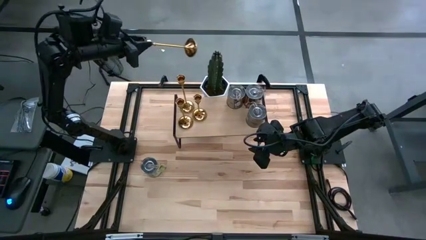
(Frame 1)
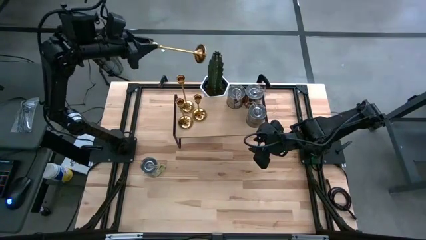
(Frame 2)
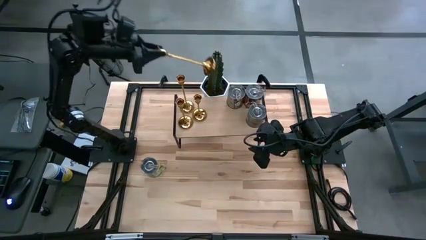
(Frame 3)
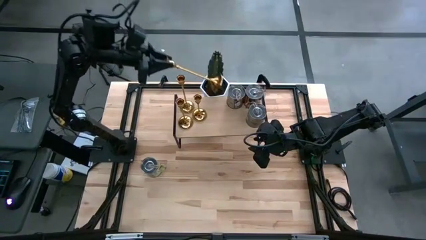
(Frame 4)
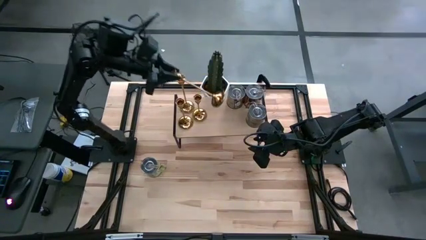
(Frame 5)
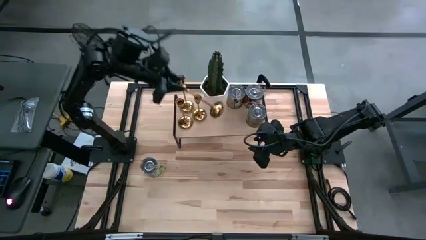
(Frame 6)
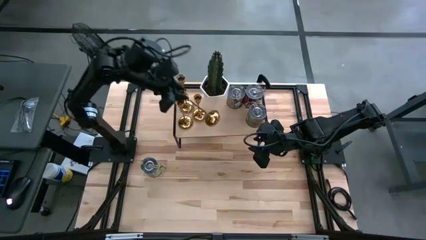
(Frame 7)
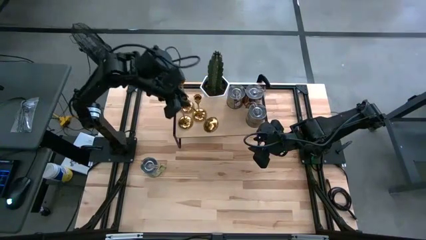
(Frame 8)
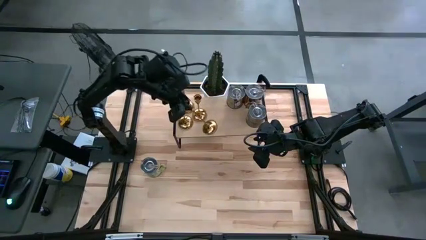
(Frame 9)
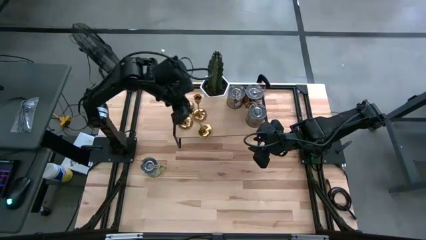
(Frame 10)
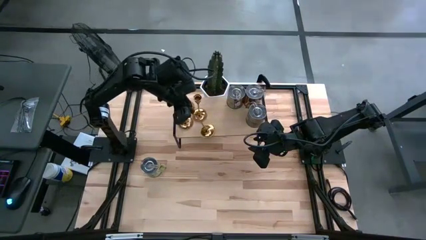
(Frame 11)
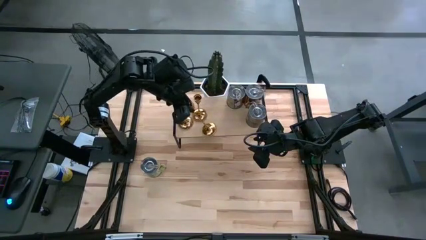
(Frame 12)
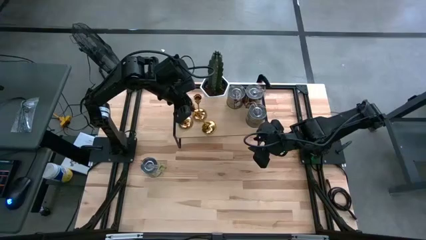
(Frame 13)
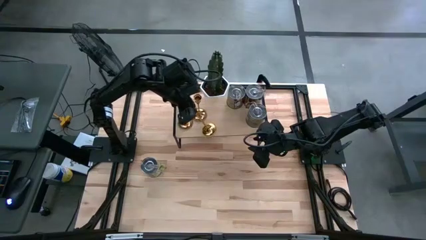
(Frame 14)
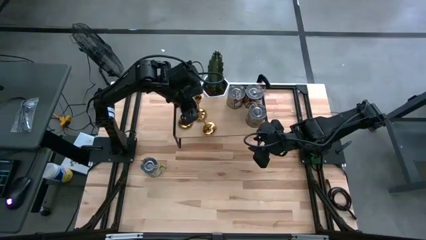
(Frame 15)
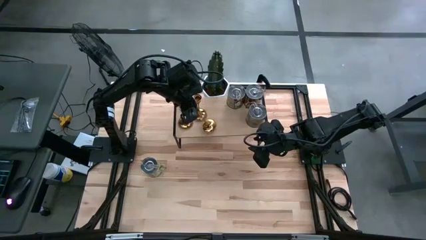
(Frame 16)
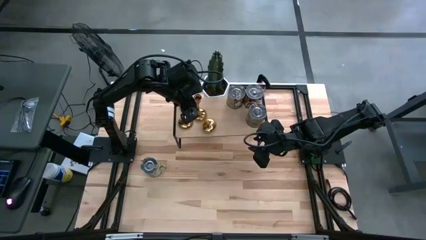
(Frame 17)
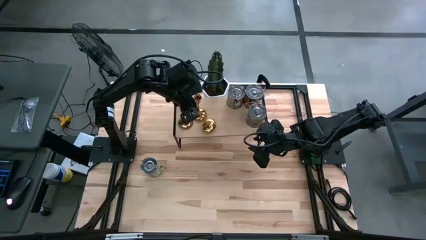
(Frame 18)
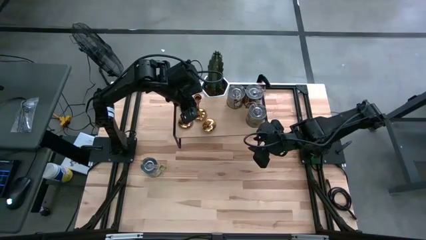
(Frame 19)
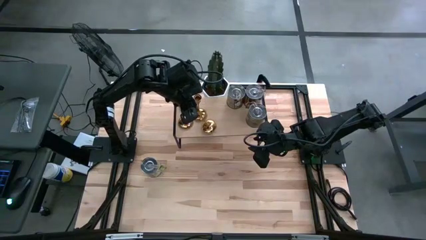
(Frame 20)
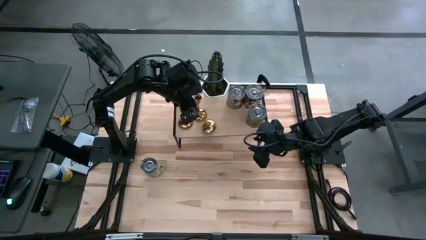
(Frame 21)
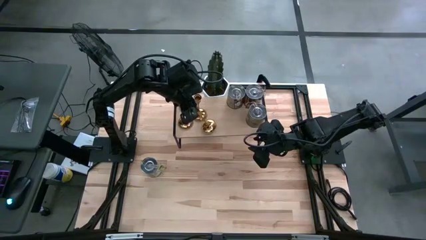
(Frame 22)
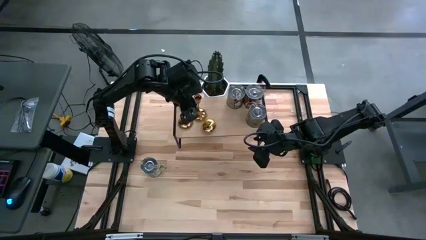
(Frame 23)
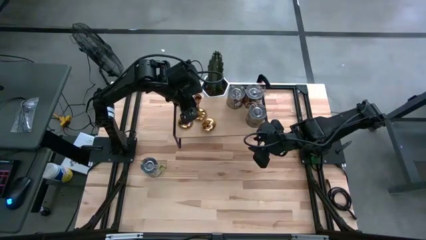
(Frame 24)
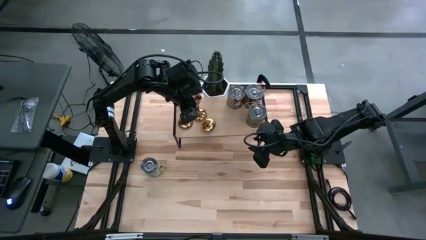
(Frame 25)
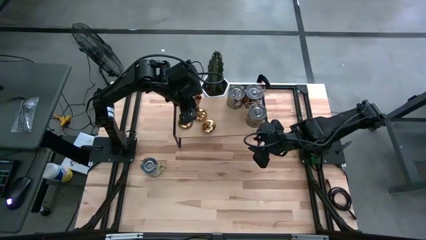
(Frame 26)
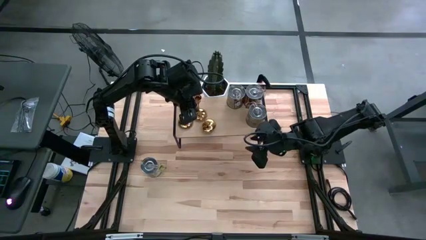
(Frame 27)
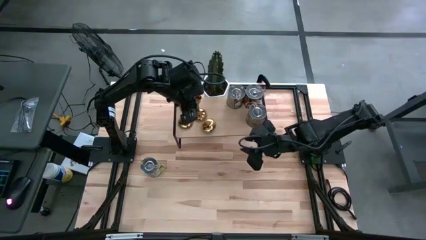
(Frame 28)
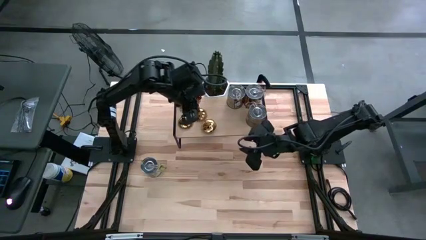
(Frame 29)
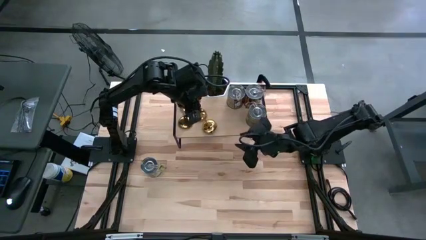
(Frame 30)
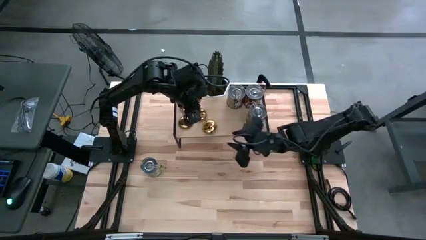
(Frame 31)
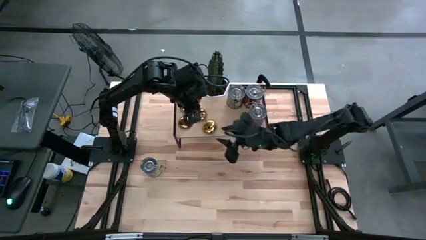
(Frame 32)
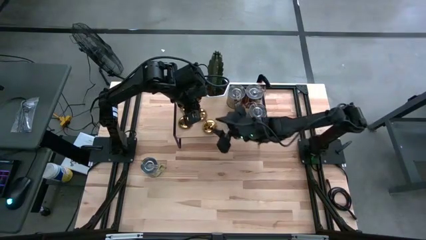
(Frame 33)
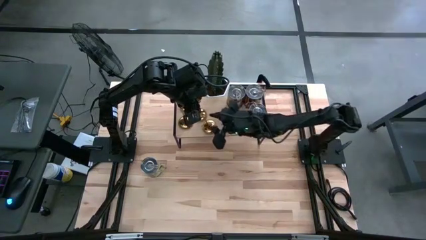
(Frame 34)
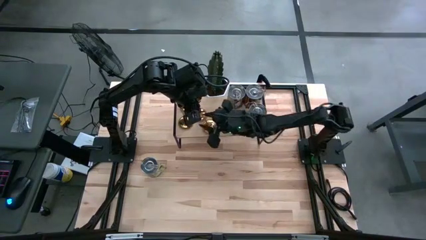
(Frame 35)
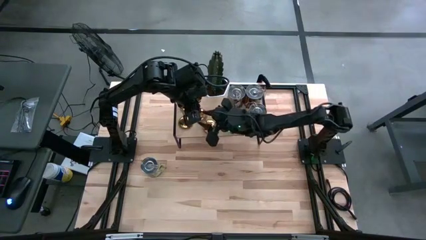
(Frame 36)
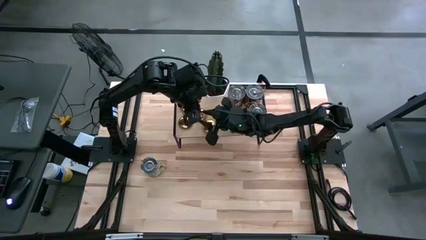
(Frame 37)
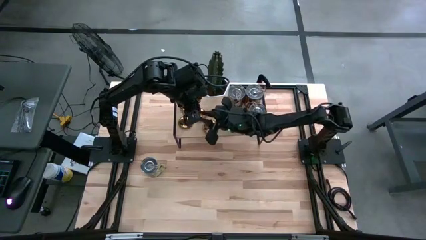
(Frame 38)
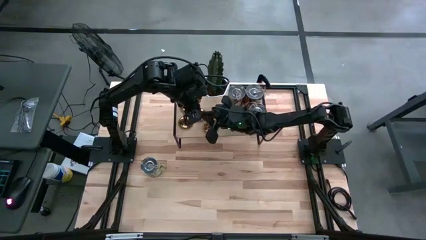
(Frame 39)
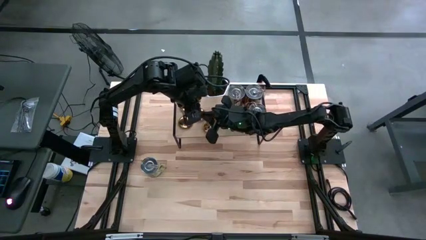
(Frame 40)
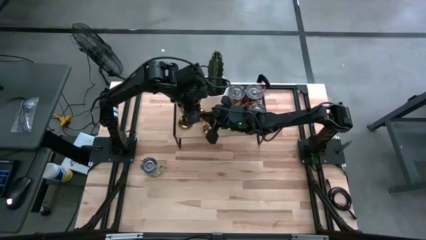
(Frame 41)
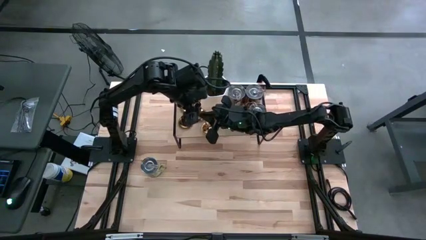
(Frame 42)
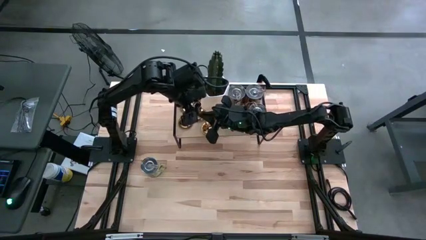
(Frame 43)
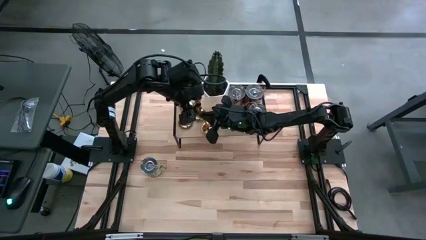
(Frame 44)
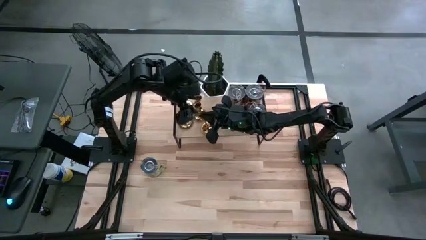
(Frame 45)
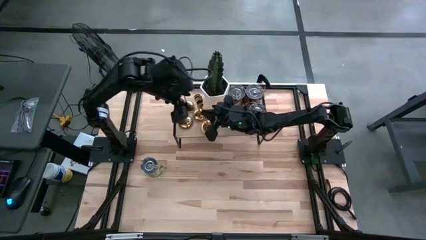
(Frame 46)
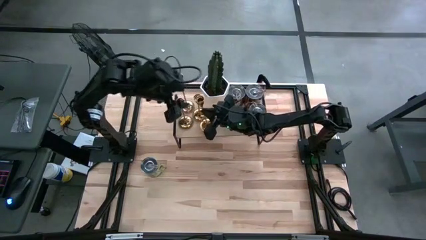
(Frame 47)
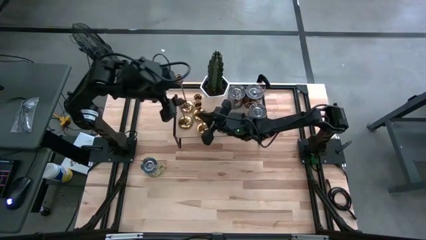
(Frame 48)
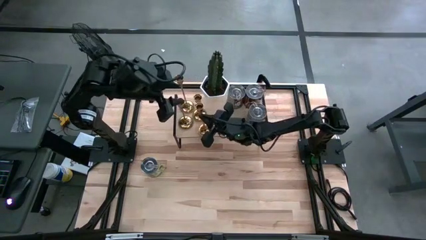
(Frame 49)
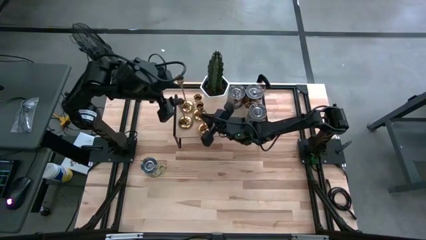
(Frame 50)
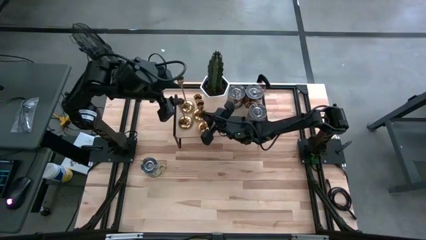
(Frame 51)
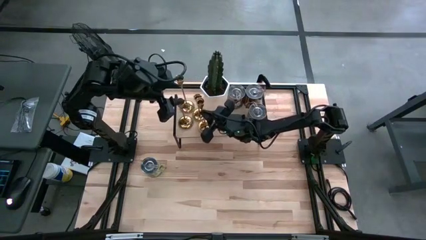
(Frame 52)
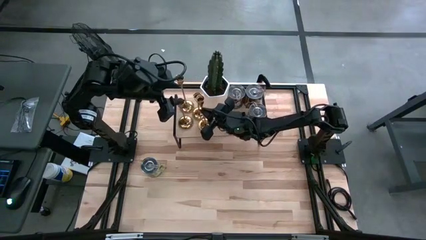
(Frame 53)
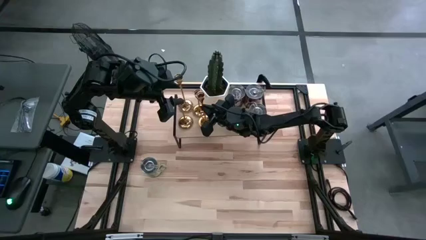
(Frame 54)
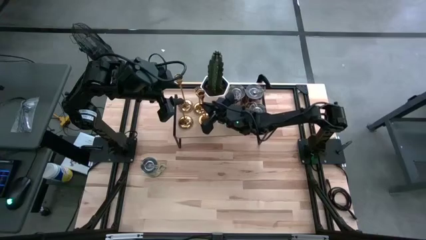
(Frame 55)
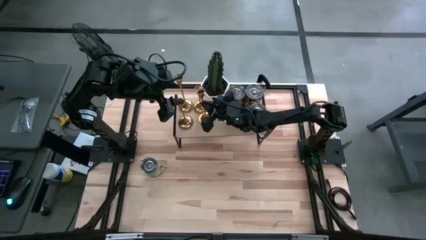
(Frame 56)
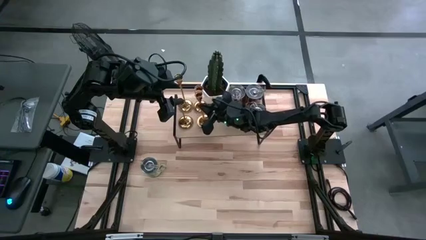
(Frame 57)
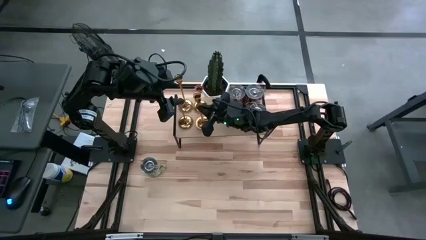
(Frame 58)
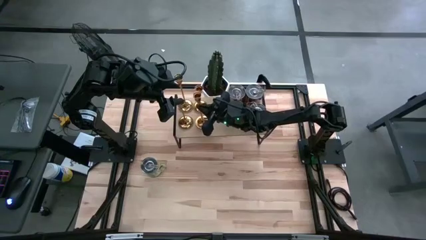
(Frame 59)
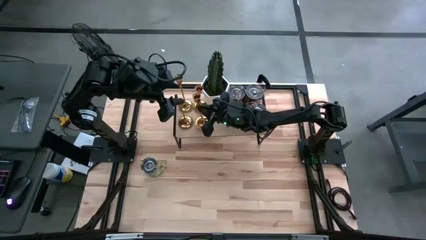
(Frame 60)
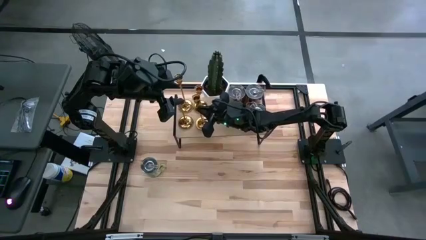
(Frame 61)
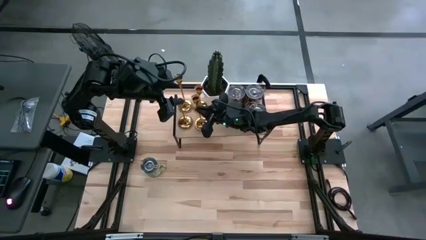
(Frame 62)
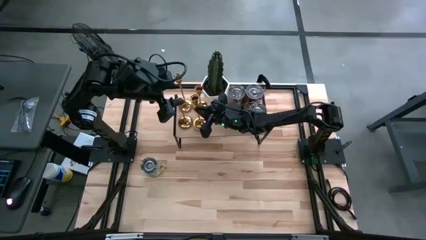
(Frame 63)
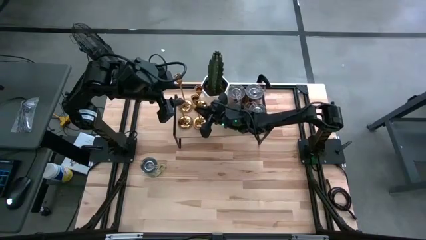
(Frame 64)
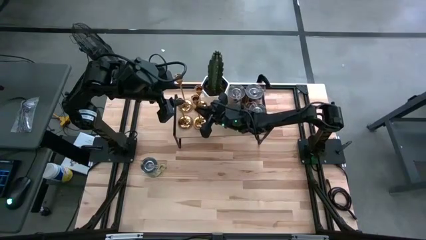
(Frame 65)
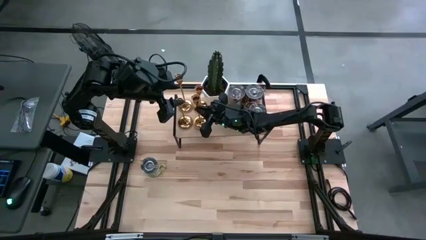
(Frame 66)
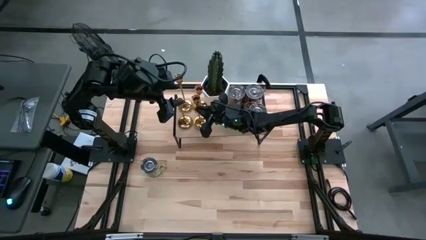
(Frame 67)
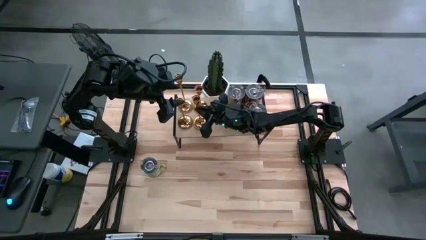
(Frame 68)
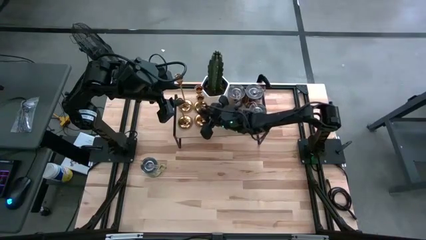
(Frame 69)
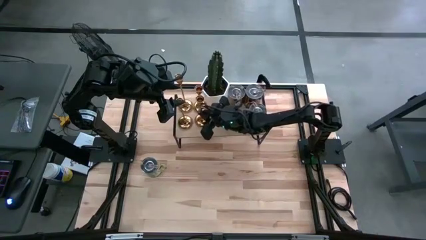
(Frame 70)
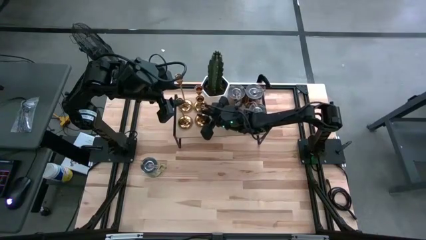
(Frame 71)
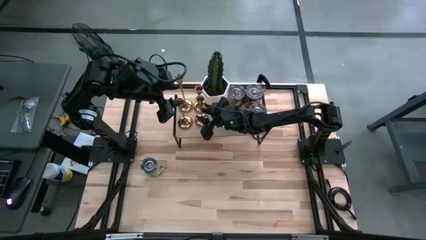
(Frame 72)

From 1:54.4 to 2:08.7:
Task: Pick & Place candle stick holders
Put the gold candle holder on the shelf
